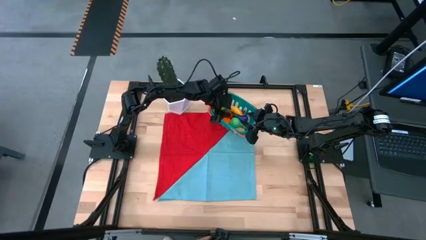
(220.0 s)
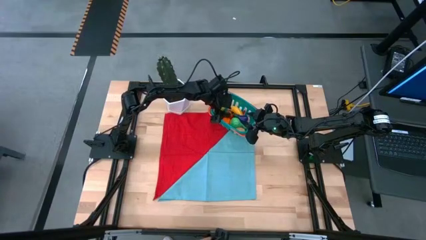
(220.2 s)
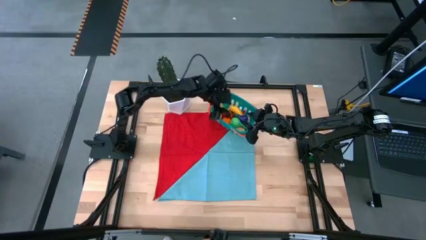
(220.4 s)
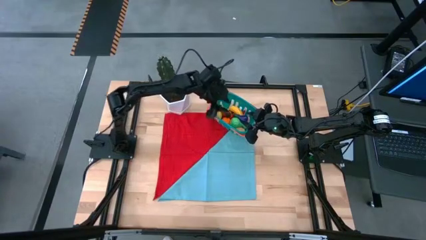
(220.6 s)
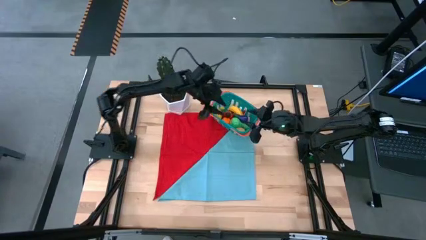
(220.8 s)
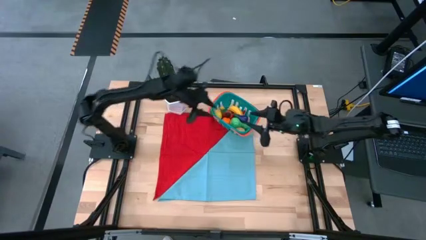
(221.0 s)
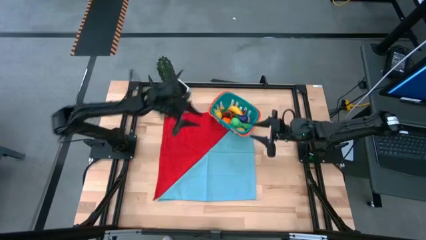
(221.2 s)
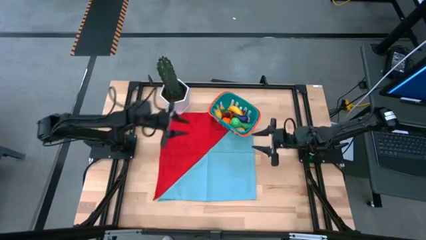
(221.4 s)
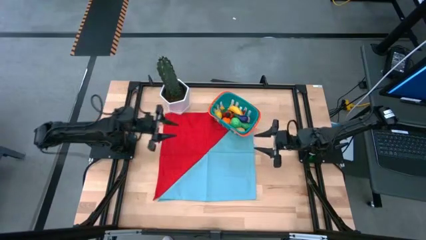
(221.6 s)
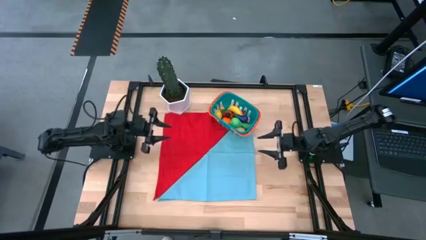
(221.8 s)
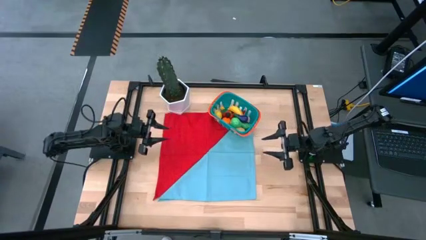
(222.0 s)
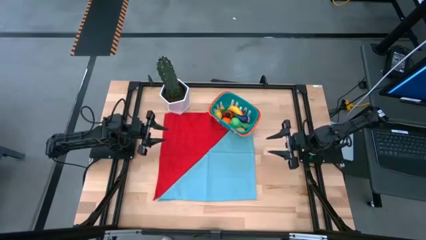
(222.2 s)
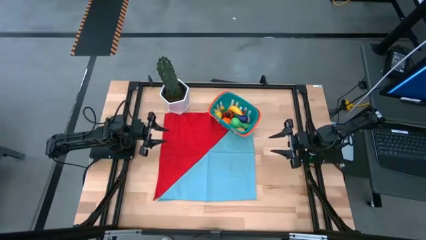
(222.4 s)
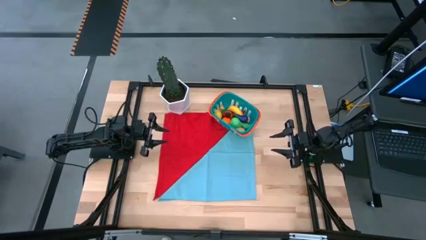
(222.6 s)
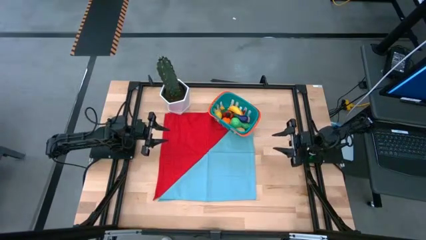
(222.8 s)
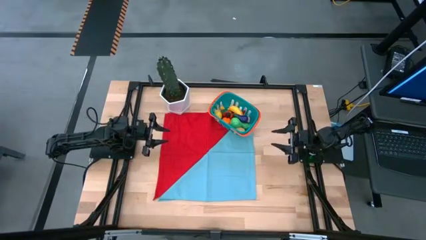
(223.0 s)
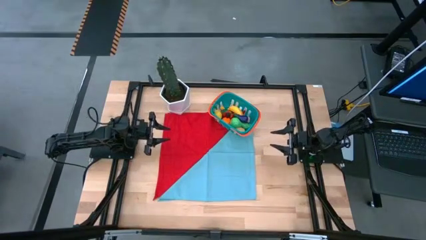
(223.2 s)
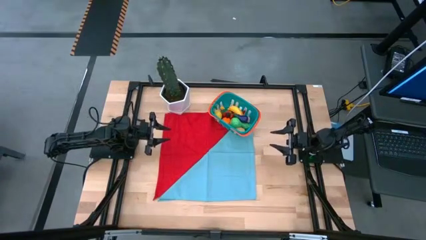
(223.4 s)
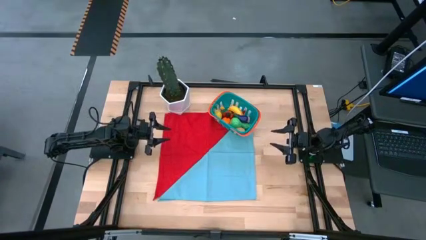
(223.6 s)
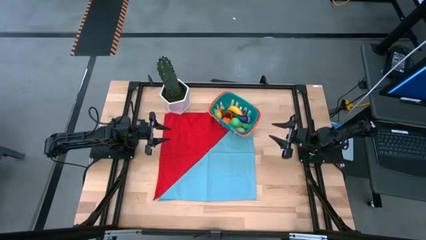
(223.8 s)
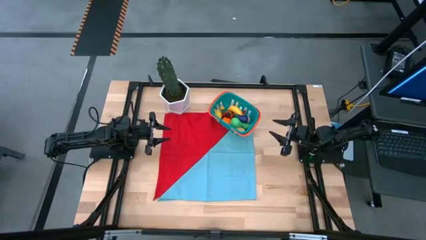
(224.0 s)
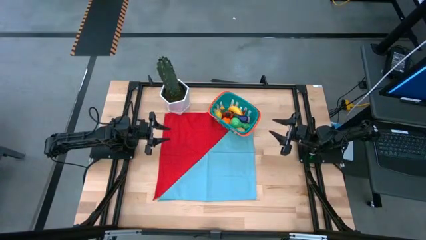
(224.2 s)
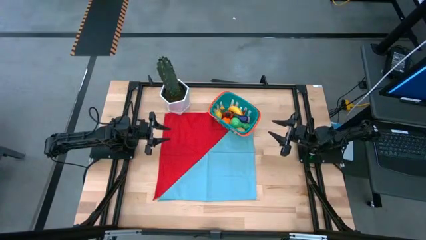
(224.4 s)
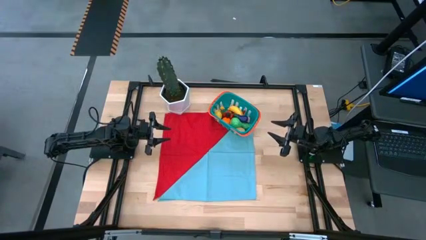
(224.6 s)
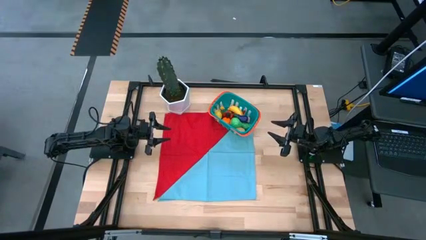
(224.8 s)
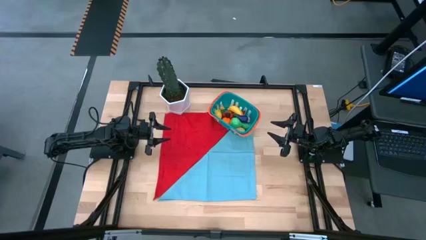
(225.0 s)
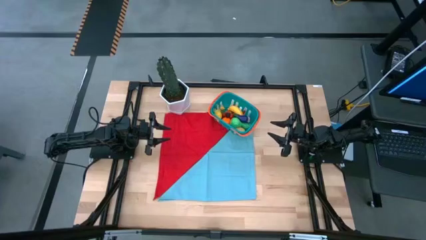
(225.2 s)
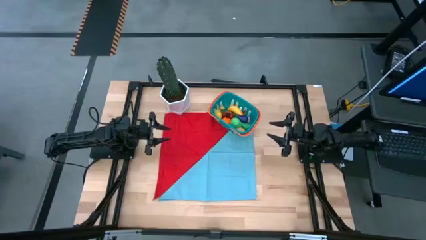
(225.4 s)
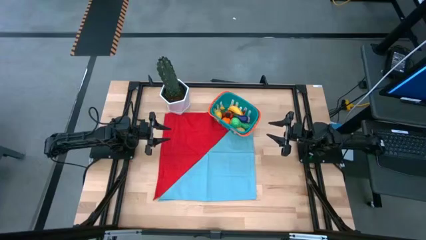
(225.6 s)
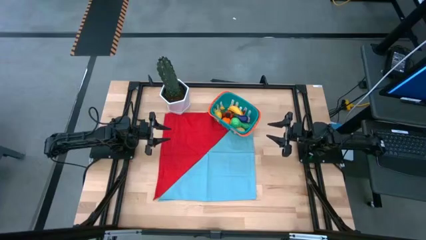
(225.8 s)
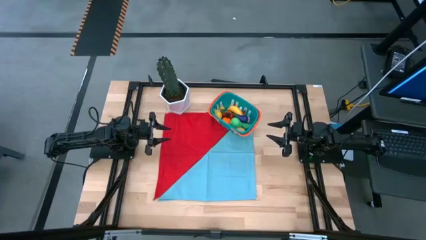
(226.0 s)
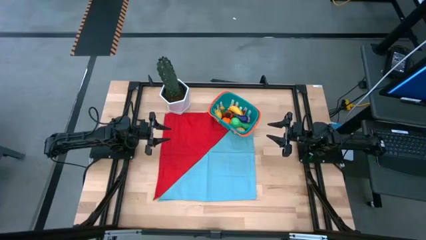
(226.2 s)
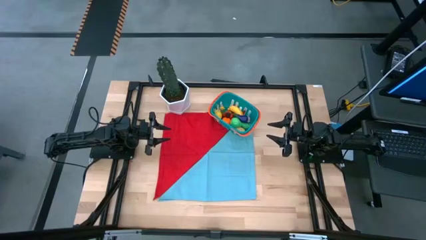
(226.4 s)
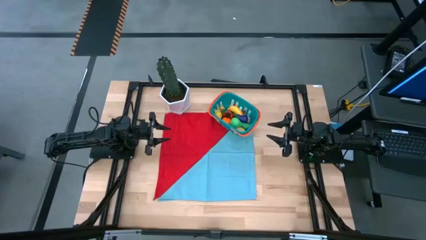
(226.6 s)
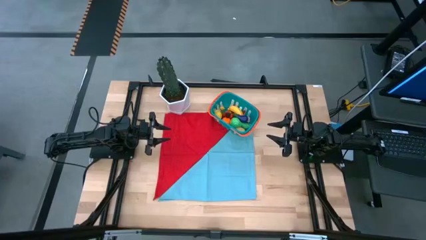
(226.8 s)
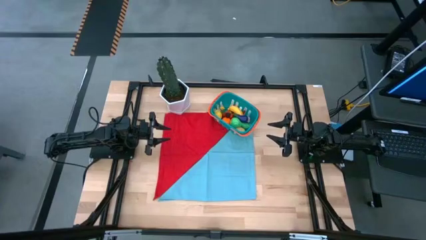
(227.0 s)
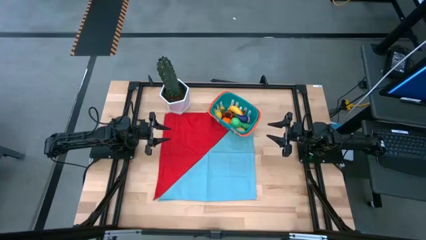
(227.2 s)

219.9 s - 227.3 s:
Task: Pick and placing Produce into tupperware
Return to Home Position

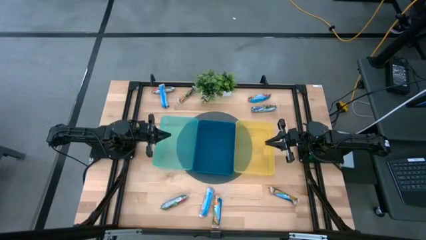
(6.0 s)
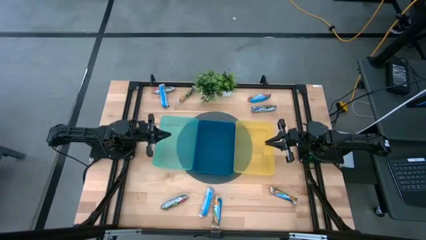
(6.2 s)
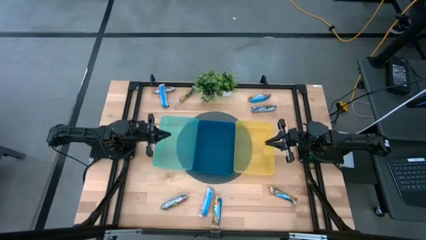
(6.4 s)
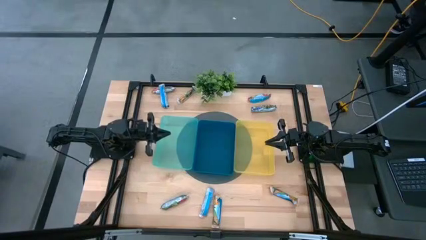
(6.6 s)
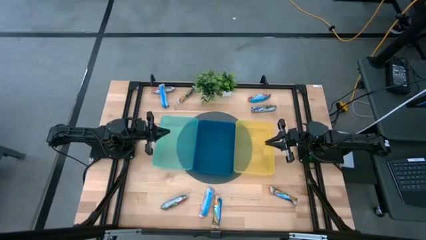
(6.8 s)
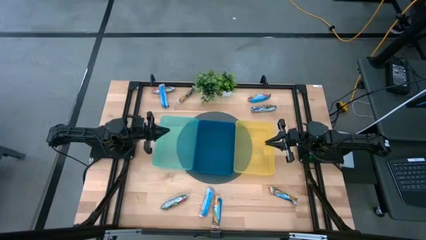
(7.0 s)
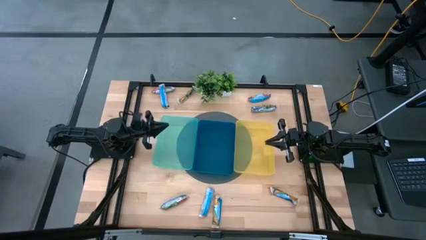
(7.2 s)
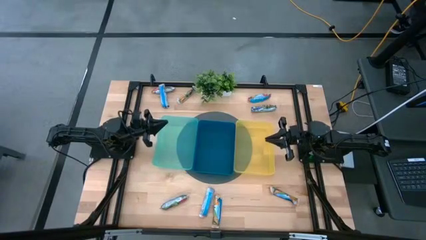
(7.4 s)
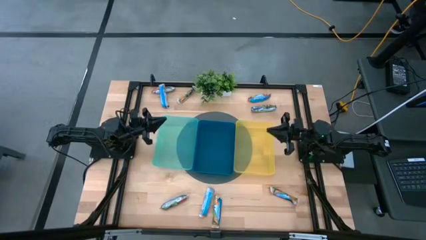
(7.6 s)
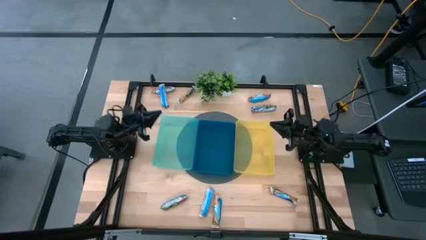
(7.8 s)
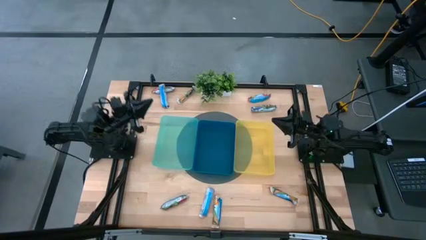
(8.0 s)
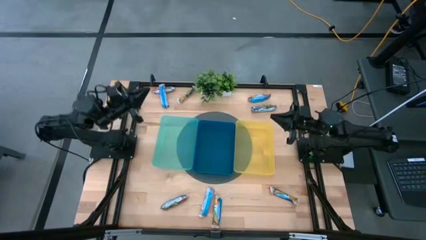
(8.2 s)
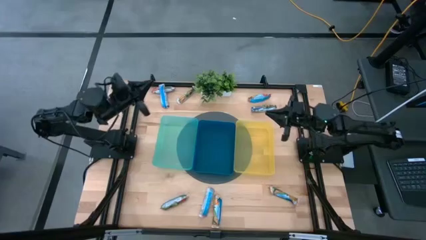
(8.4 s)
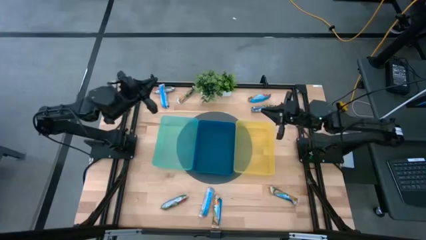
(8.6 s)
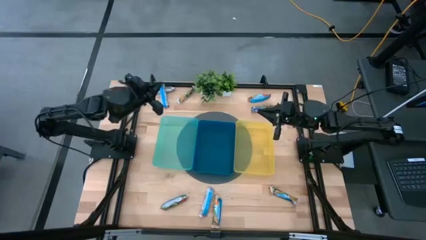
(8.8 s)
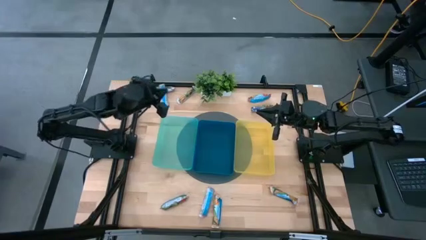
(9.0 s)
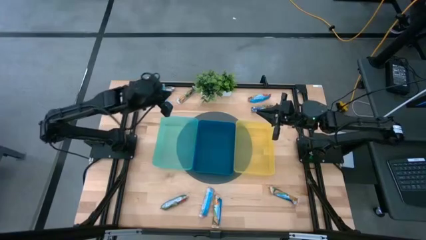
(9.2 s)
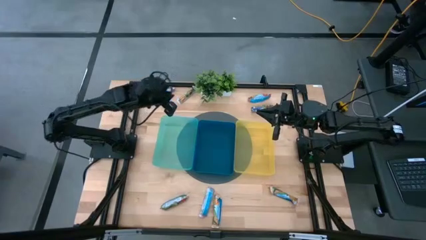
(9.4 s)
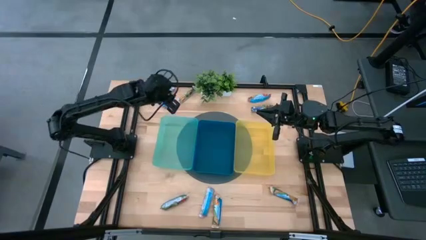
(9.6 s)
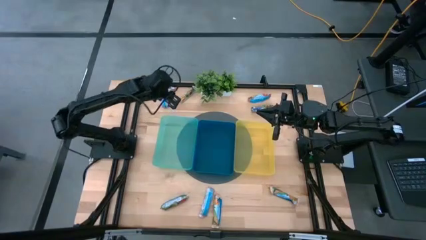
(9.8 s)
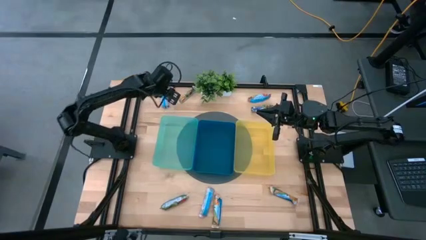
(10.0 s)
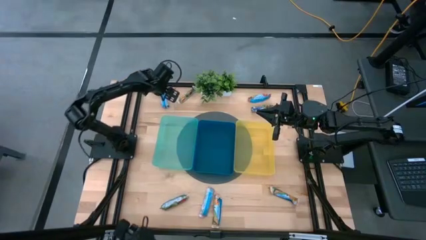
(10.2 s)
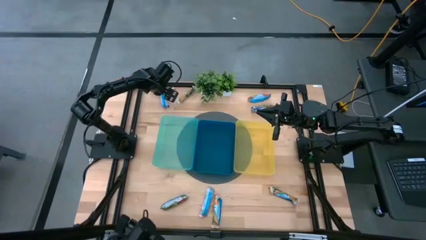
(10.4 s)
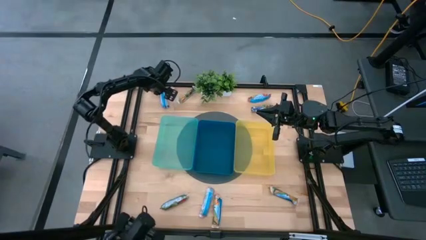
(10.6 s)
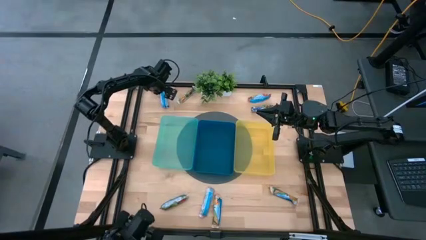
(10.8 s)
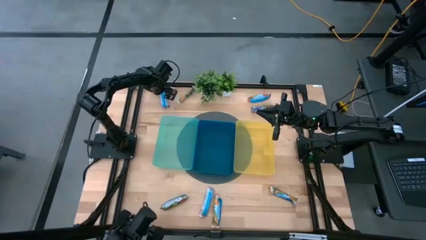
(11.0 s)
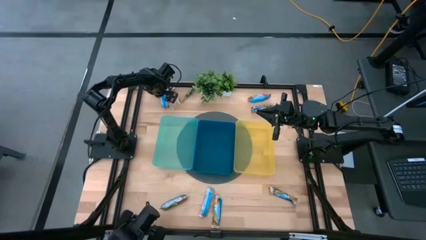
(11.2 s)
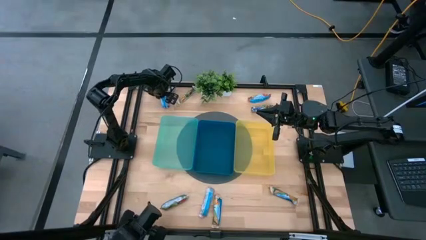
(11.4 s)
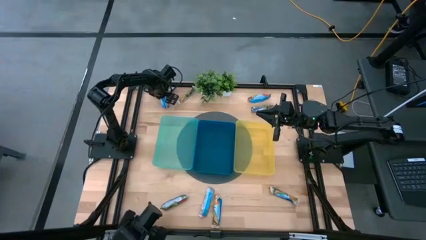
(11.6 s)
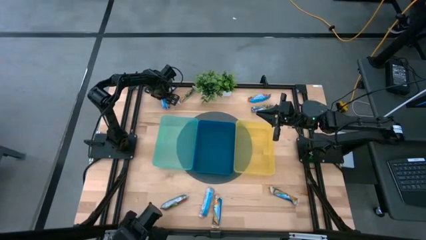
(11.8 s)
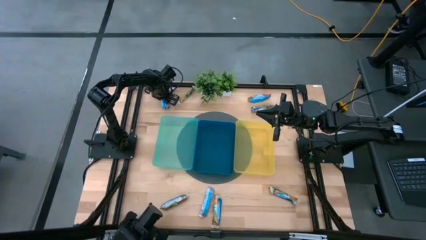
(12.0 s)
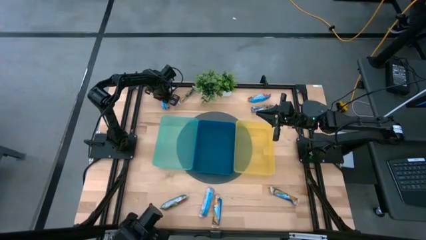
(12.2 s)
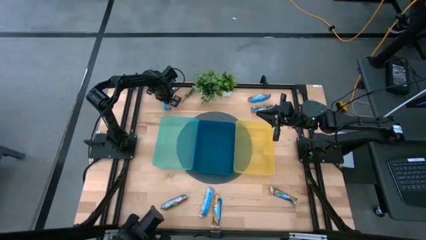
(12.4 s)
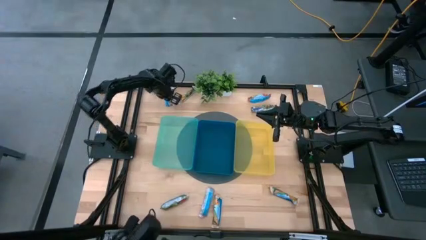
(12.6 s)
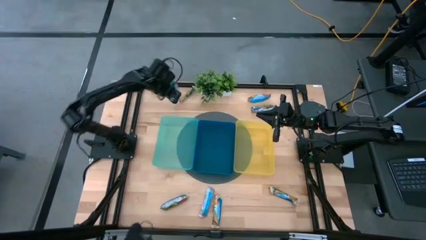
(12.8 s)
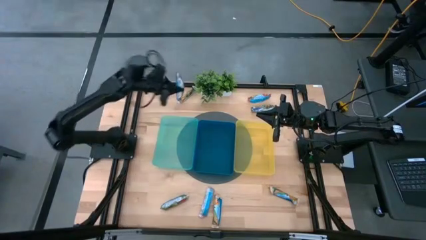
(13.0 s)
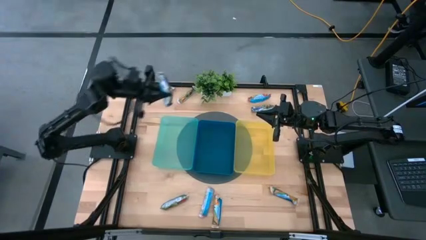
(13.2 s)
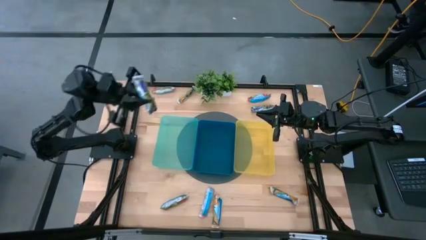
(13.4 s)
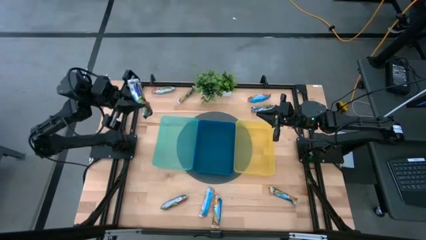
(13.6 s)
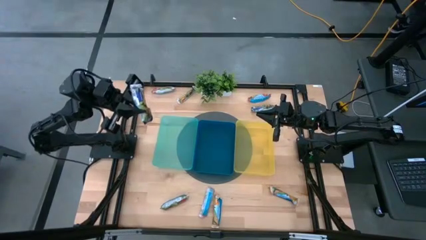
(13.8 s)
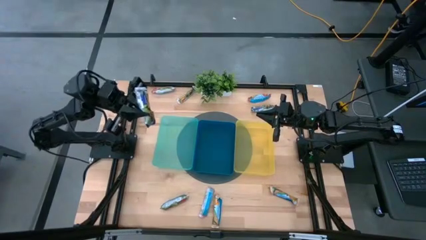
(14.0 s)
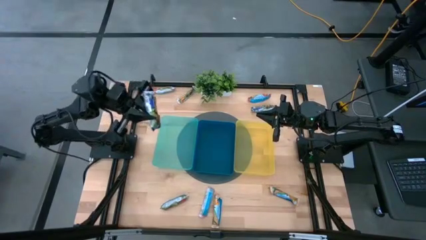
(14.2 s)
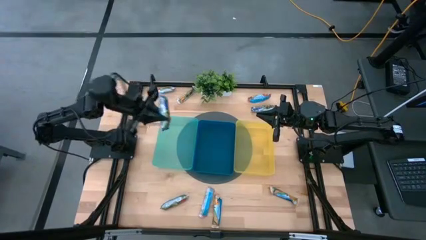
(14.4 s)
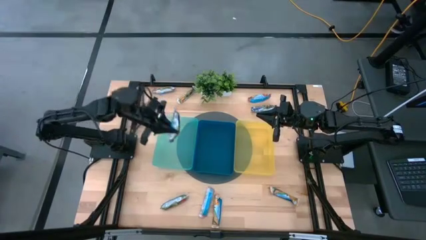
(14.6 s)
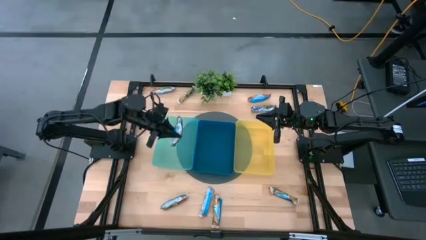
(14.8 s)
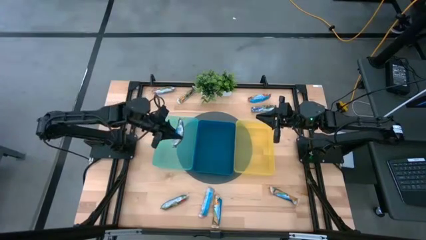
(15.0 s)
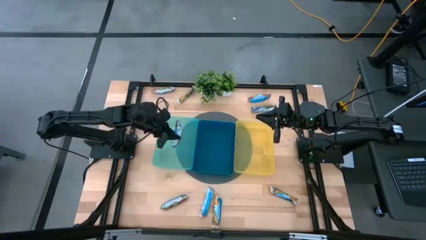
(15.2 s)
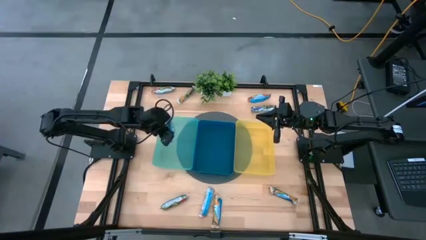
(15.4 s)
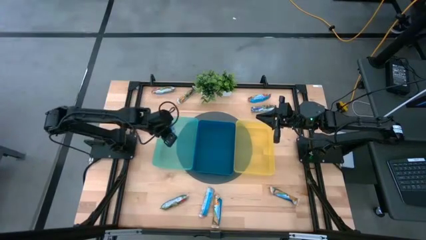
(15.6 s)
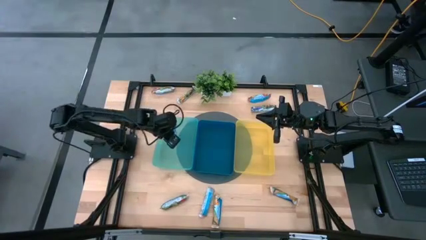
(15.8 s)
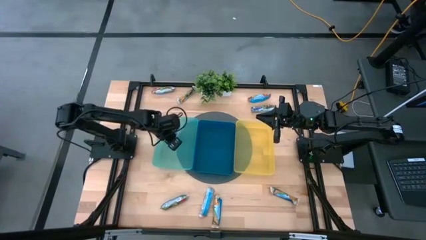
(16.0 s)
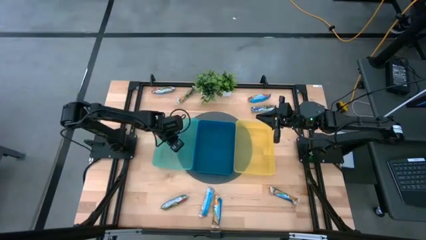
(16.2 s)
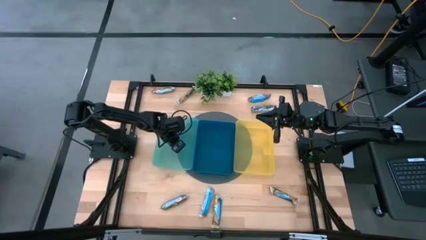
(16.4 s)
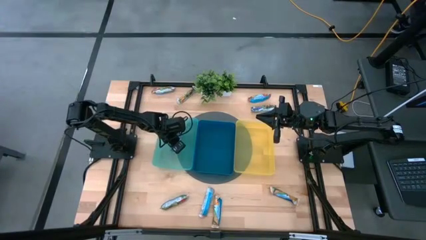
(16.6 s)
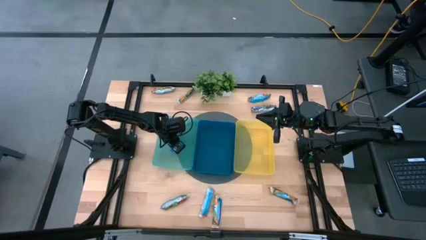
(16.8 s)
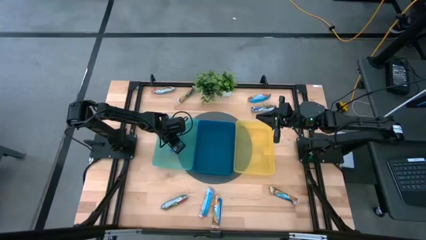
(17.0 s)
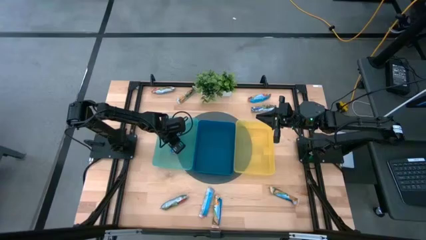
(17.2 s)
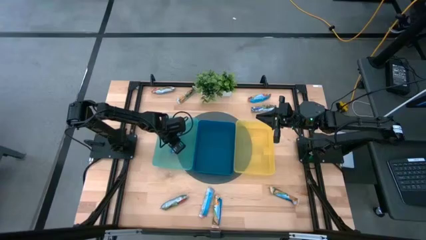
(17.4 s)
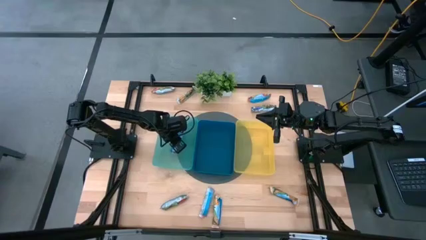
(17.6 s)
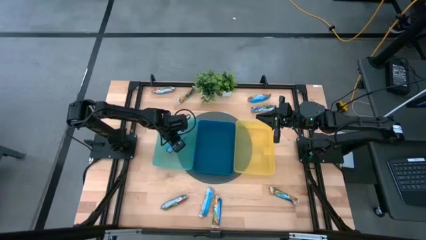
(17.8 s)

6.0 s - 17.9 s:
Task: Pick and place Granola Bars by type
Put the blue granola bar into the green bin
